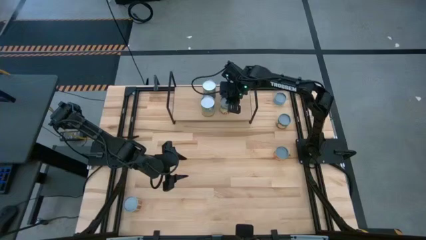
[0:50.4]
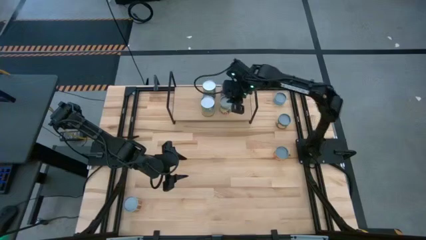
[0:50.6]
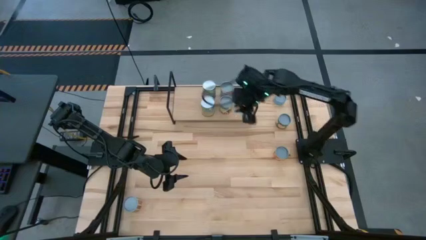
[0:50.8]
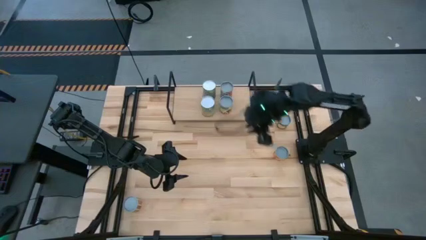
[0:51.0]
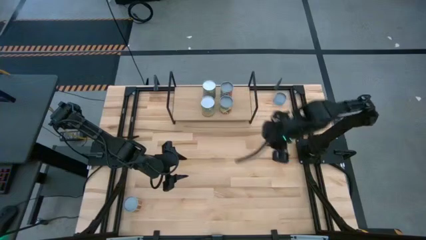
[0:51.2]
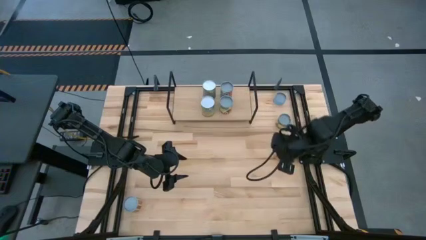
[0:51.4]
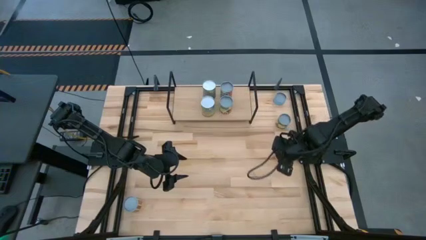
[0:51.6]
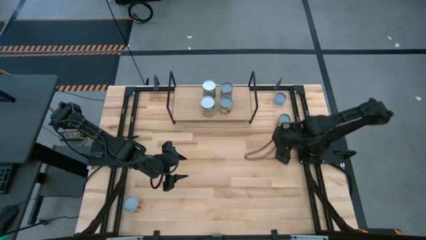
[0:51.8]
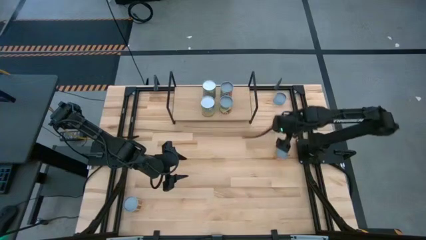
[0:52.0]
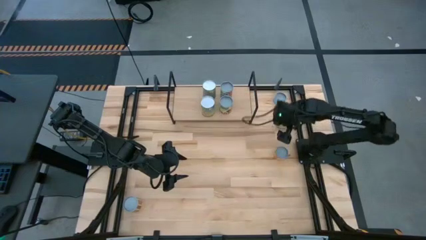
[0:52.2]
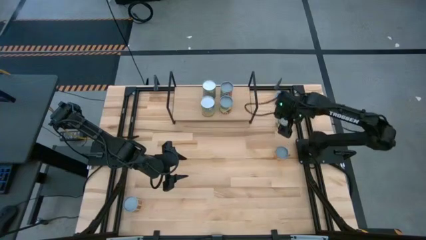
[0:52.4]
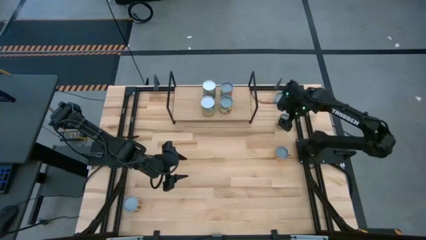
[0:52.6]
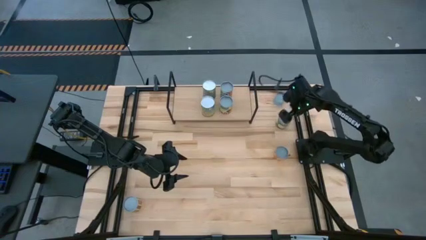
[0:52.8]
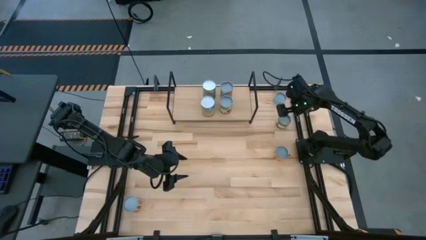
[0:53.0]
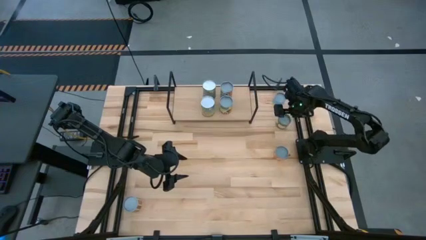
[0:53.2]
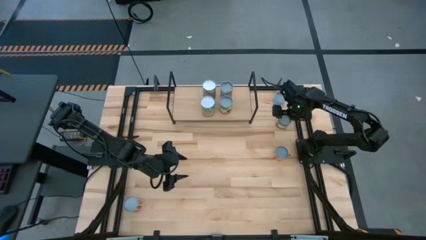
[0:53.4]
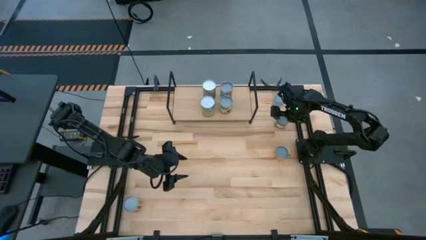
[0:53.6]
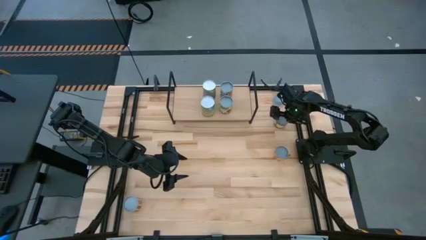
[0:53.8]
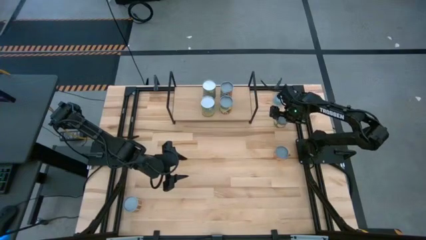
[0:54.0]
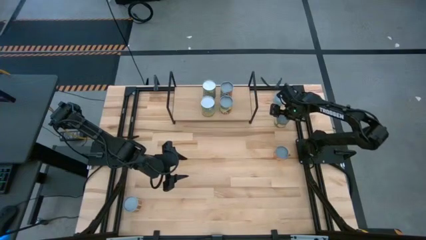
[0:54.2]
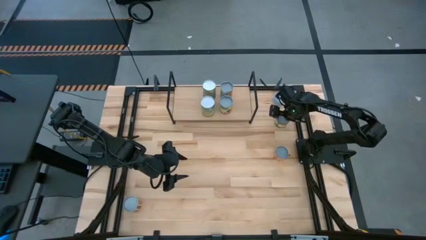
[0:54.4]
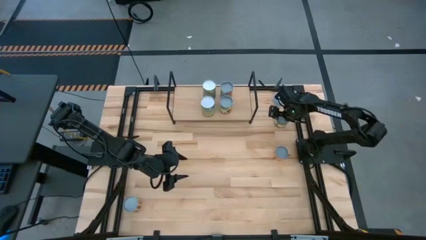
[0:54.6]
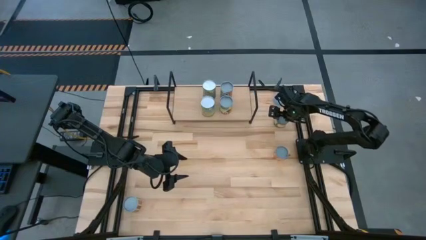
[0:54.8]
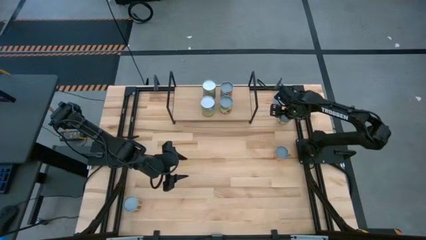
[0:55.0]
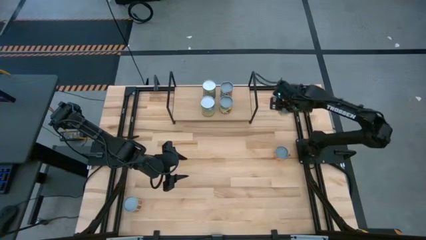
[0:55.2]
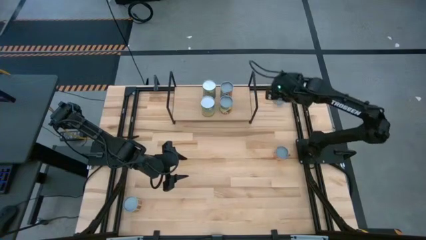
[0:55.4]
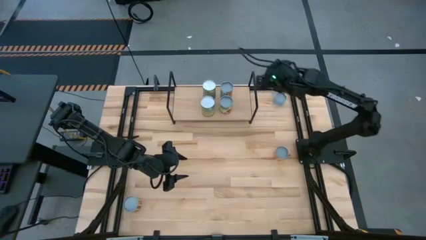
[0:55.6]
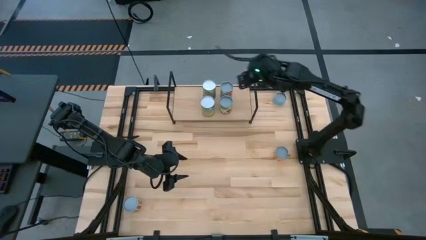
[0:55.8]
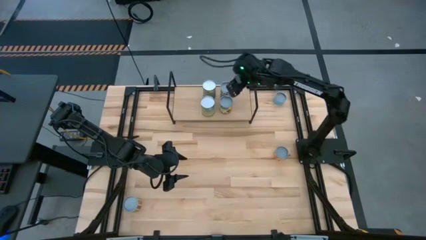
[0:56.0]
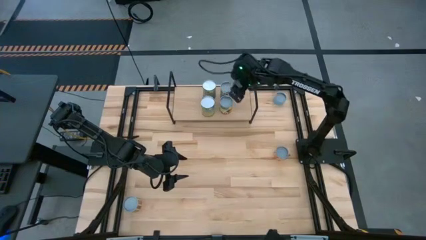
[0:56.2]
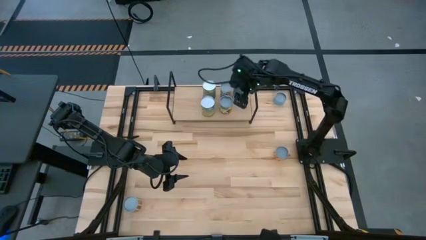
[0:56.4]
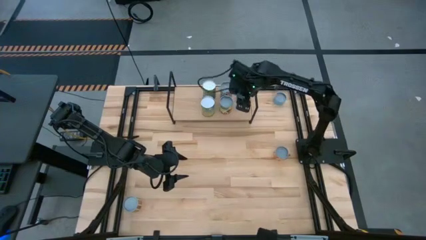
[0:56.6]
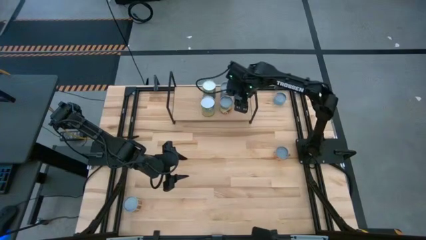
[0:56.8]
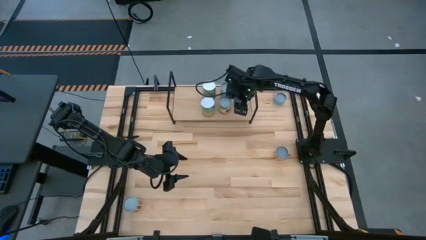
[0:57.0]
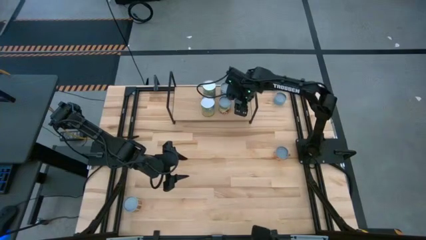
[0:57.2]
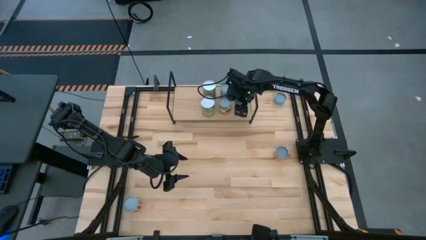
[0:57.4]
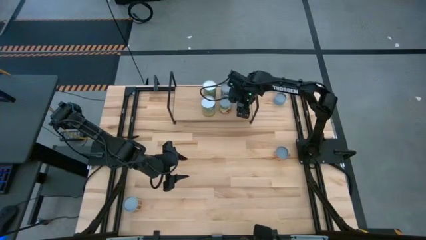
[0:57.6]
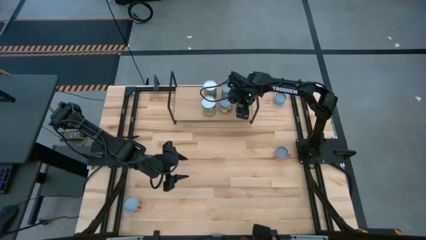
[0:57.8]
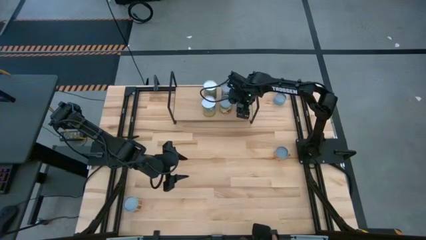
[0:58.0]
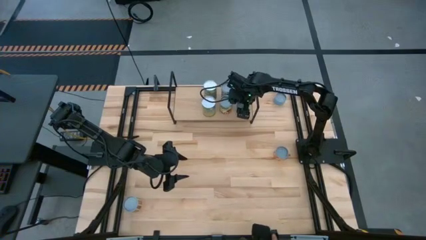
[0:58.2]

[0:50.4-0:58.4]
Task: Pick and place cans onto a shelf
Put the canned peaches on the shelf

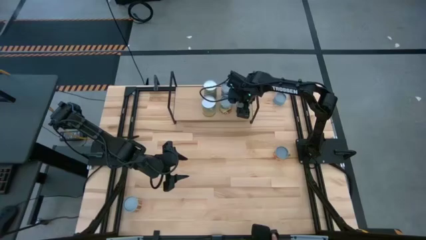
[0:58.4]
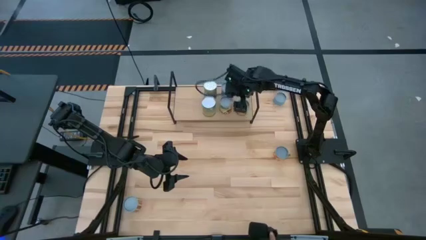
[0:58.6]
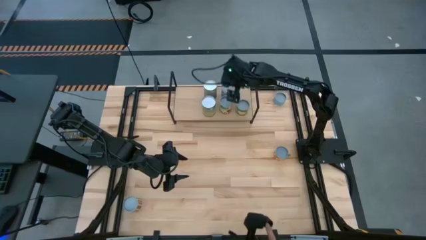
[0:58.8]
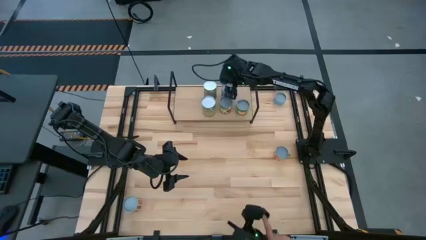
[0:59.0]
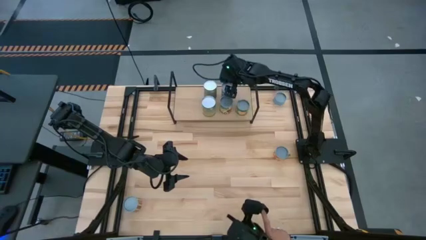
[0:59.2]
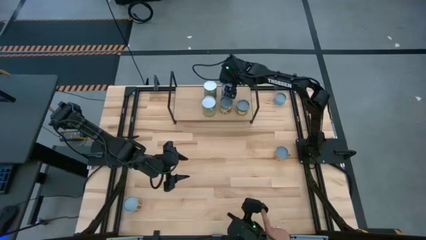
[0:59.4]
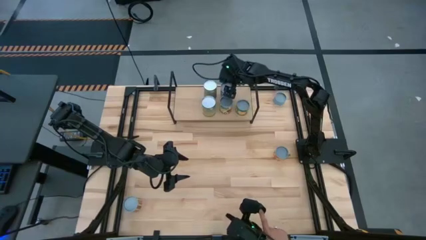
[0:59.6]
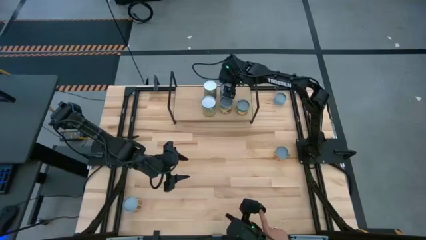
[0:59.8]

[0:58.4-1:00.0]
Adjust the canned mixed fruits on the shelf

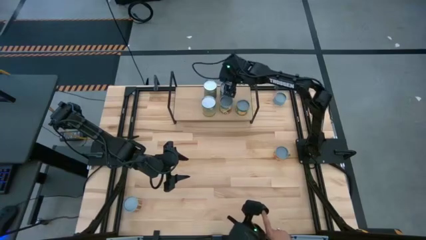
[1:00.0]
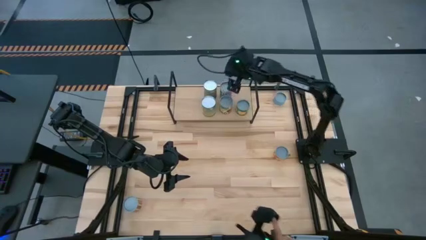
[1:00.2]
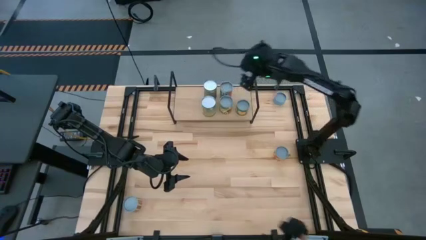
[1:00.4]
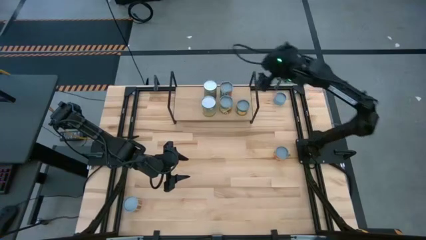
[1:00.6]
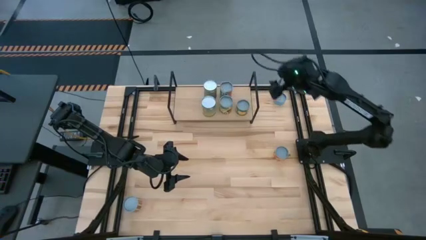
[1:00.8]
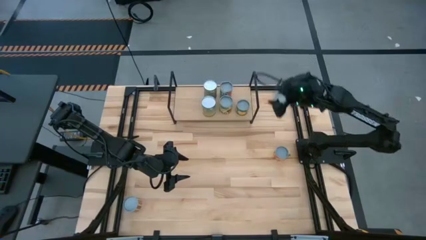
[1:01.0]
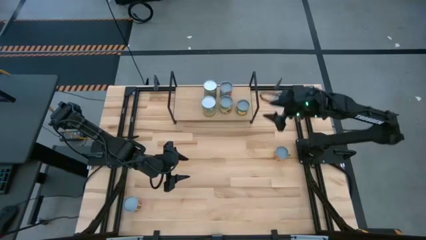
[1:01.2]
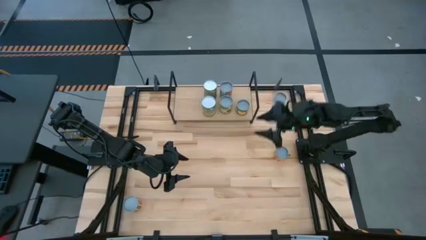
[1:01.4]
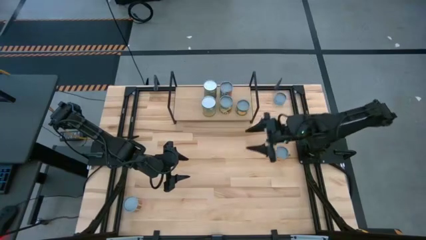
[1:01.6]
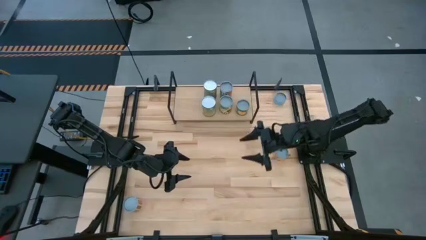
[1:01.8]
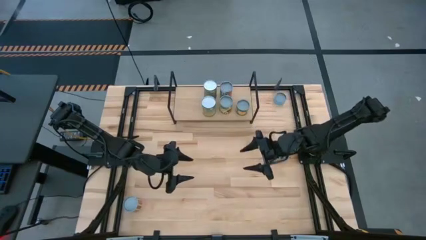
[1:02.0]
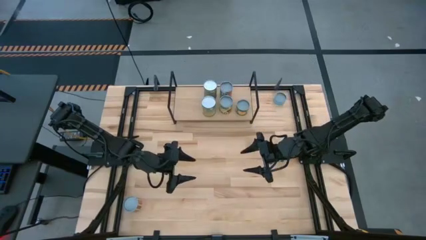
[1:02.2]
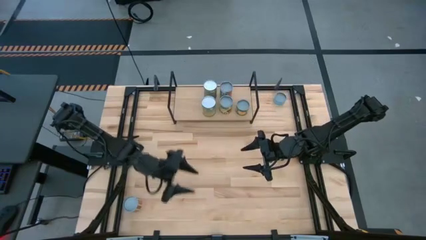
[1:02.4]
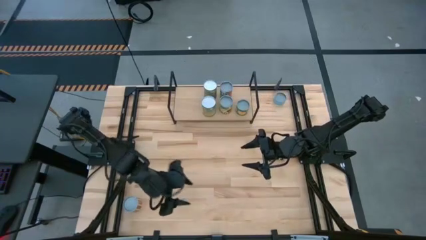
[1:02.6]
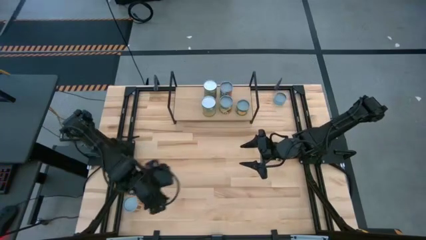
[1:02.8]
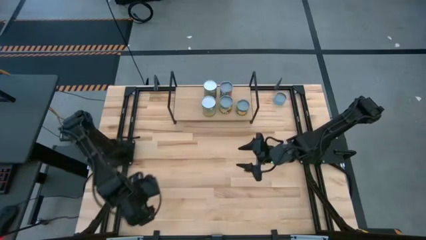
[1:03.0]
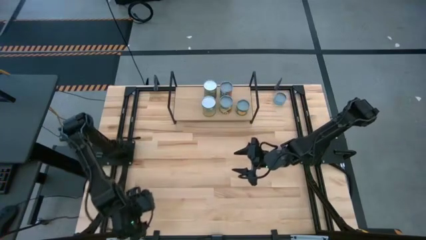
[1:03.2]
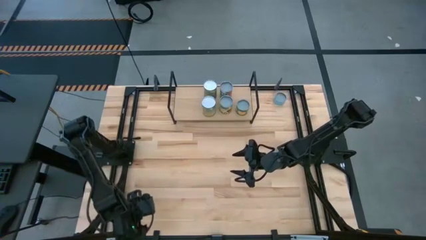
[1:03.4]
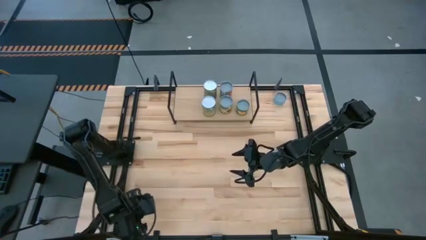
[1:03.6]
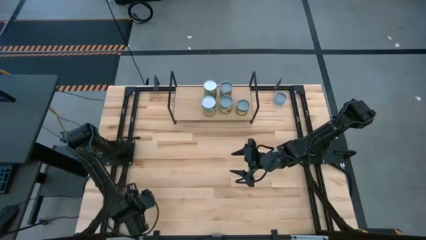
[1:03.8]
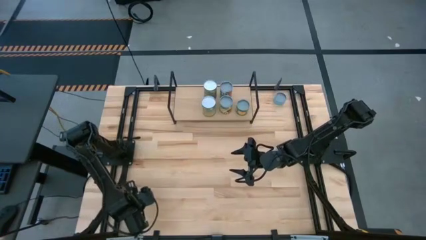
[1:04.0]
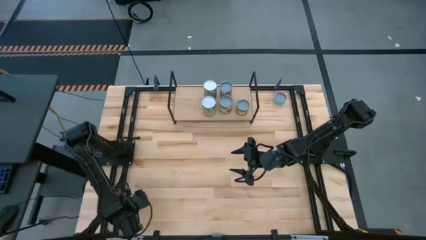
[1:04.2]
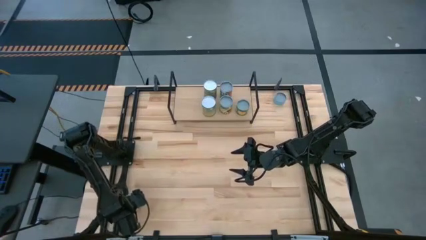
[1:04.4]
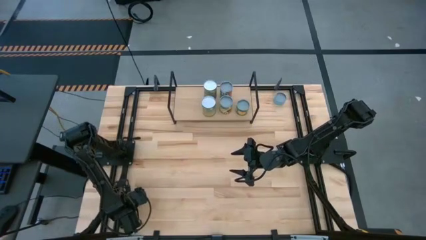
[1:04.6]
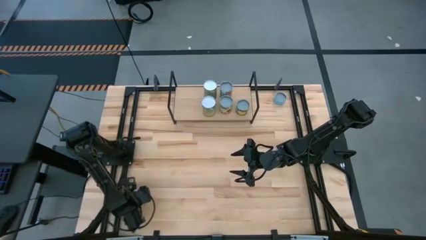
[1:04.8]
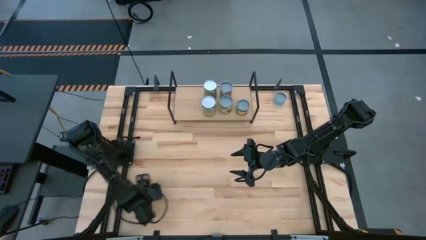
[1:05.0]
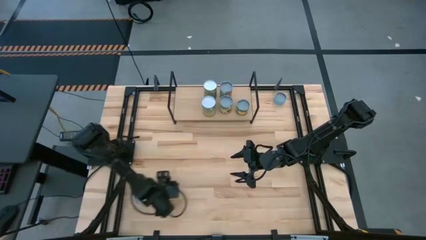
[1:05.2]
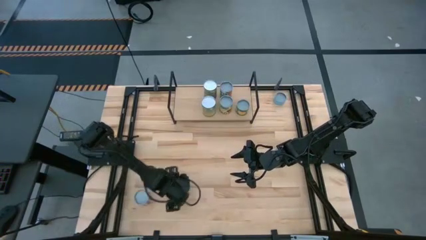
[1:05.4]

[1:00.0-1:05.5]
Put the canned tomatoes on the shelf
